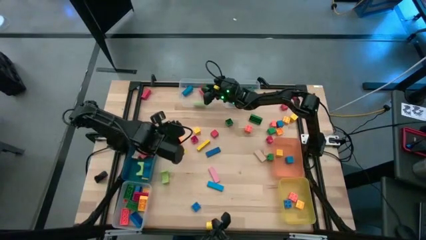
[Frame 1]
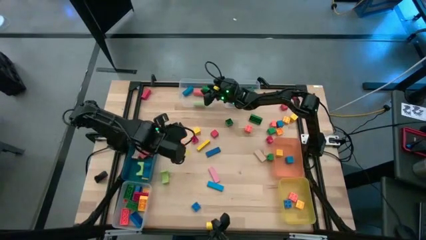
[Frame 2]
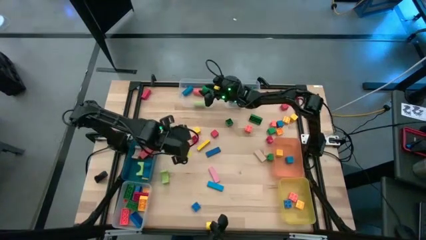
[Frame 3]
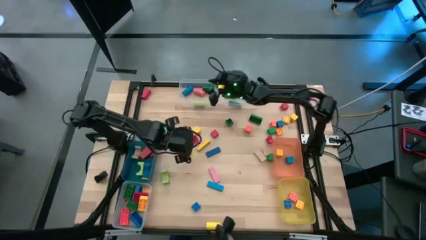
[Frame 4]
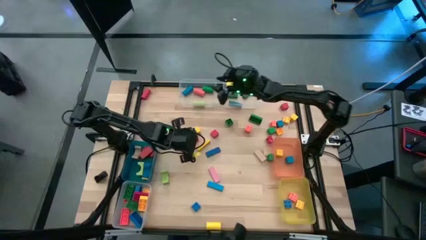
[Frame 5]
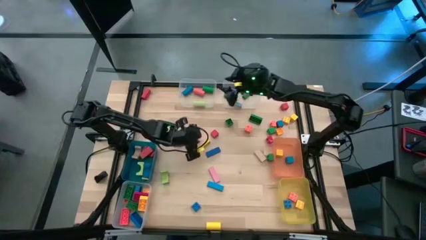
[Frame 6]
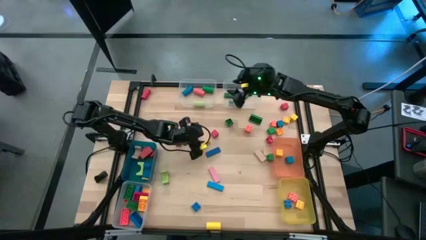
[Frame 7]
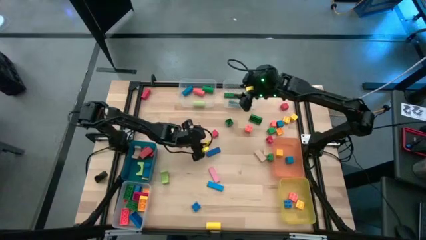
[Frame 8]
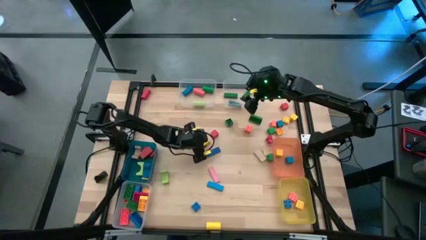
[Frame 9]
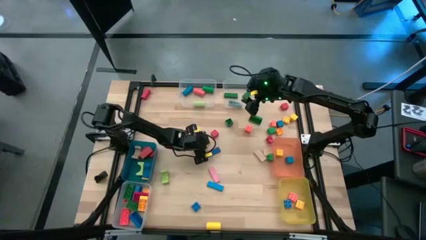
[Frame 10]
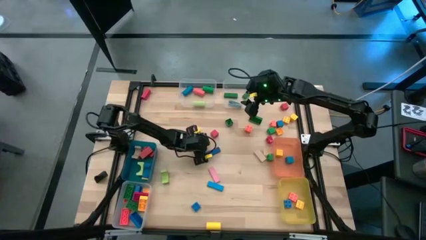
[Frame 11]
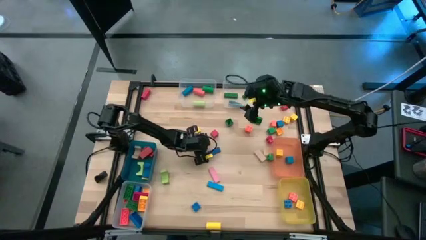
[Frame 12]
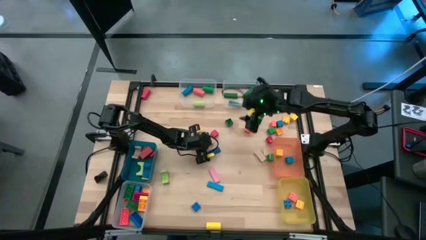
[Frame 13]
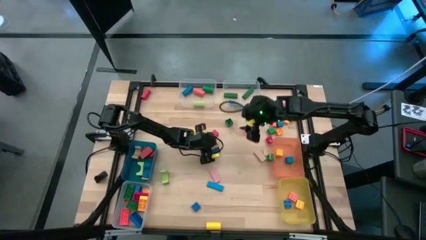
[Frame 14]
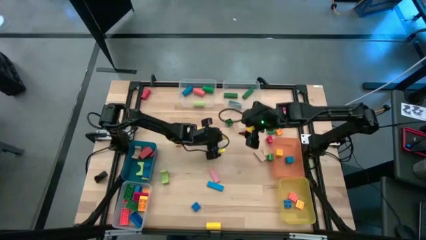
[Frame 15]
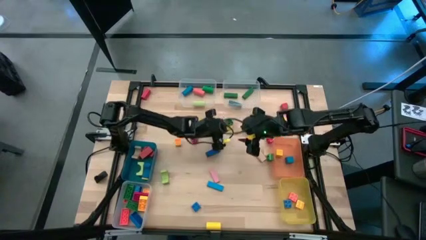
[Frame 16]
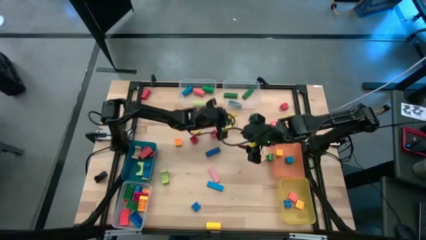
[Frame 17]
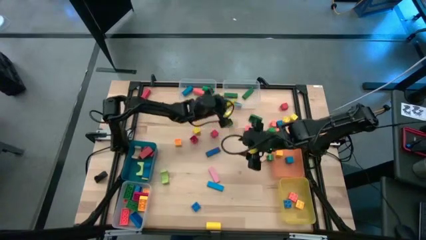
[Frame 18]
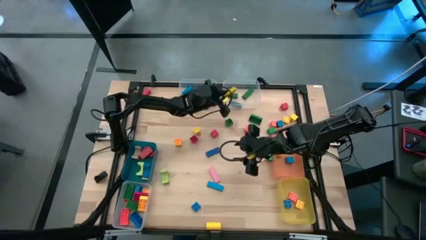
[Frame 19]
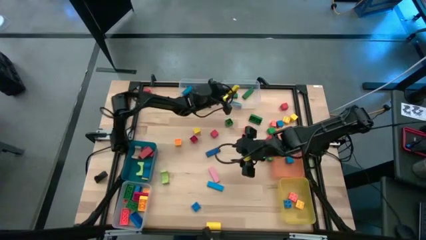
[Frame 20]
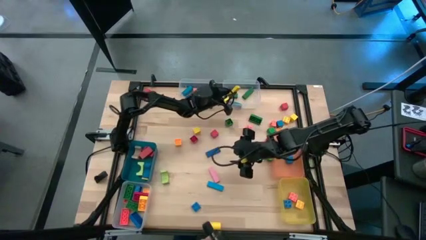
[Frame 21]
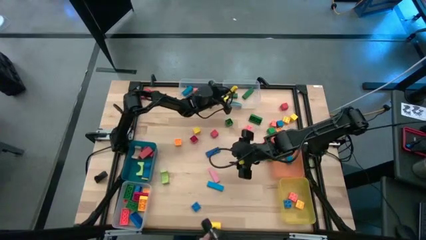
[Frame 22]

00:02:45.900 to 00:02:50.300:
Task: Sort blocks by size
Put the yellow block into the top right transparent bin

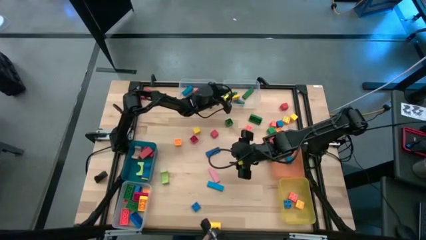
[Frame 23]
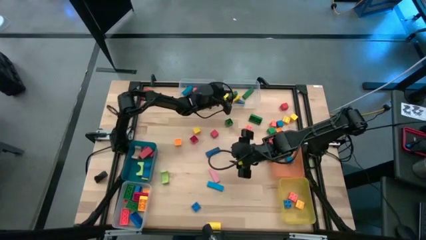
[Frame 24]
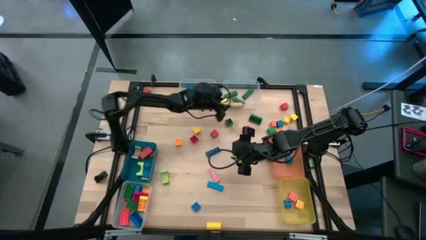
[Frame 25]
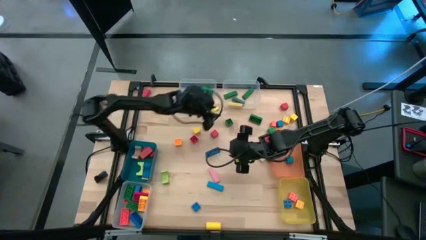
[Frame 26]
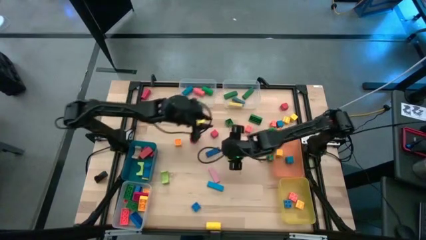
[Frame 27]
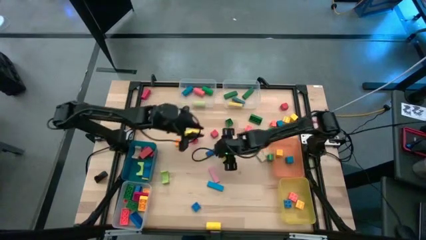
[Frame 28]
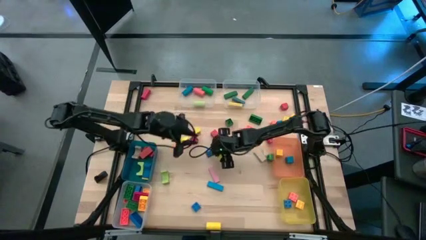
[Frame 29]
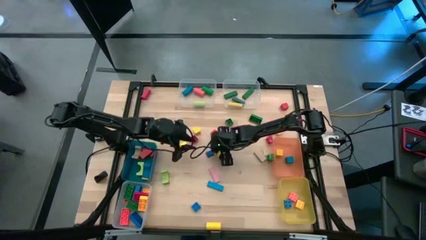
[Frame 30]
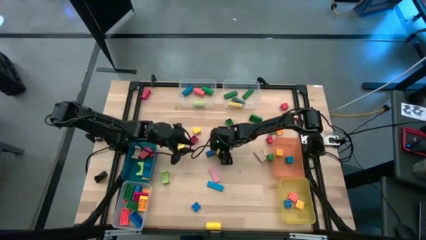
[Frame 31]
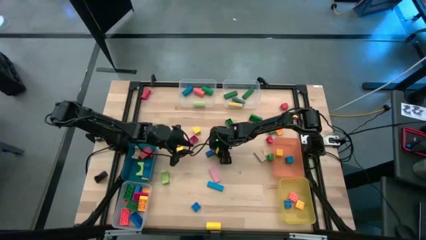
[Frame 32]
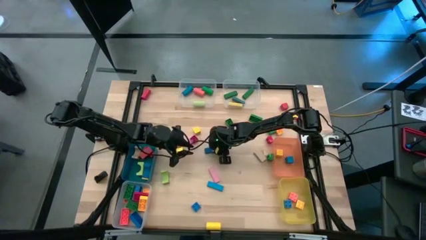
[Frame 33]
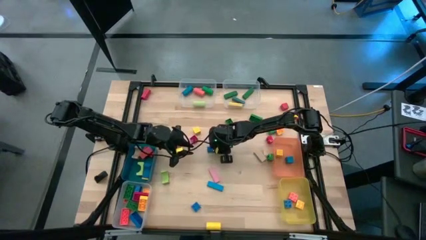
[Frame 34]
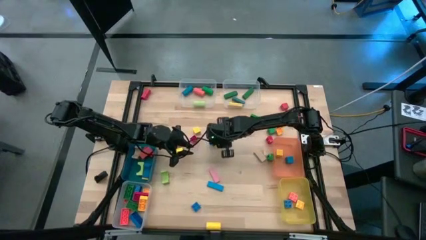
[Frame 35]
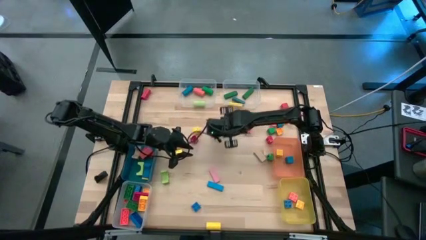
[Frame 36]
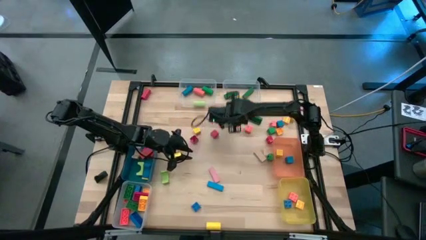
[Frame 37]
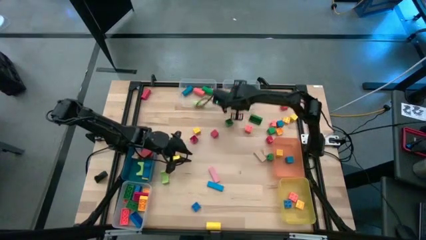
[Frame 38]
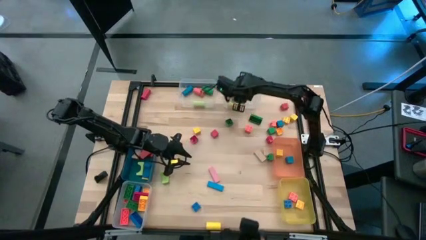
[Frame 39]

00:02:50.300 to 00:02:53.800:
Put the blue block into the top right transparent bin

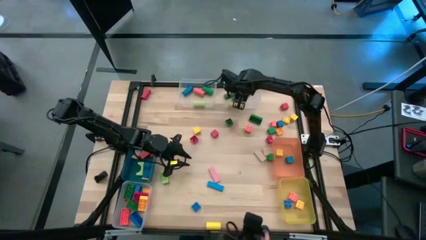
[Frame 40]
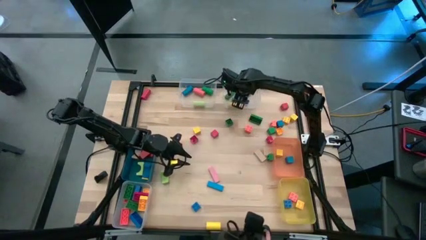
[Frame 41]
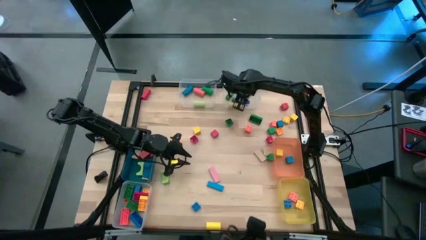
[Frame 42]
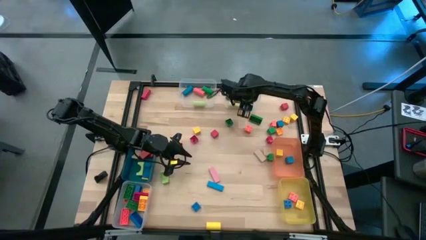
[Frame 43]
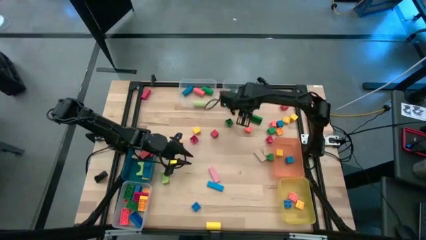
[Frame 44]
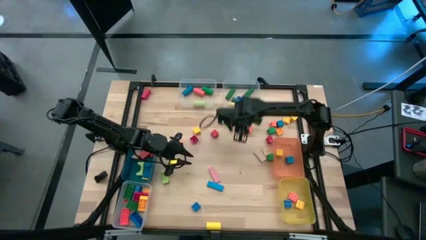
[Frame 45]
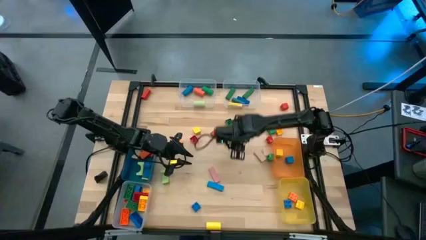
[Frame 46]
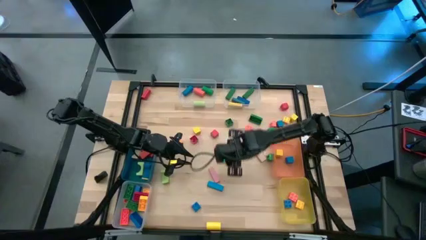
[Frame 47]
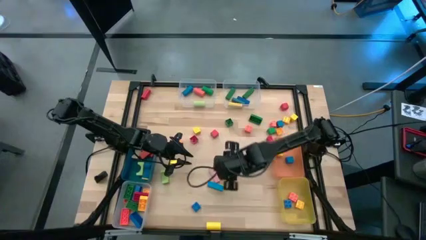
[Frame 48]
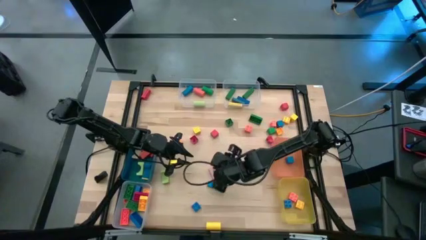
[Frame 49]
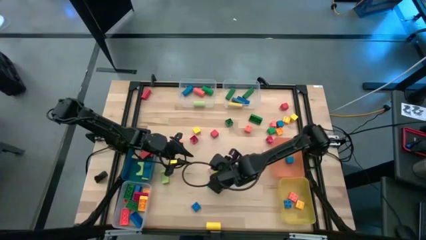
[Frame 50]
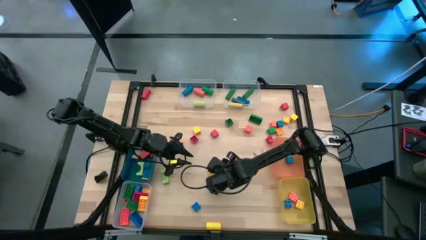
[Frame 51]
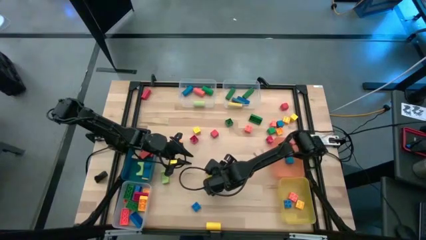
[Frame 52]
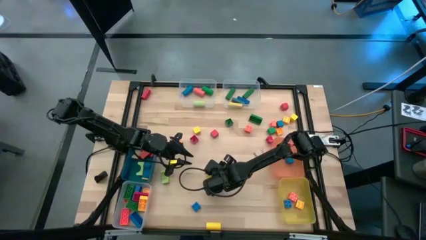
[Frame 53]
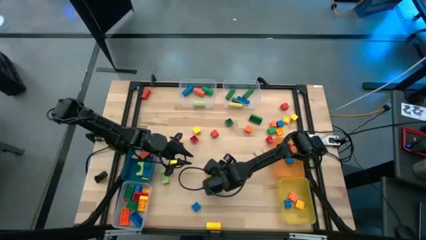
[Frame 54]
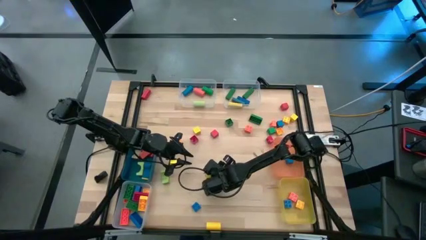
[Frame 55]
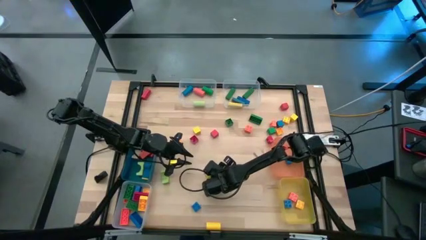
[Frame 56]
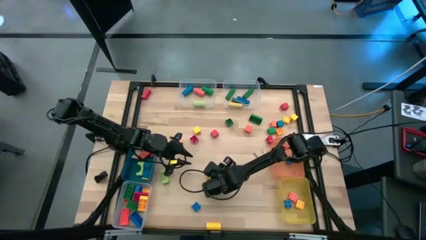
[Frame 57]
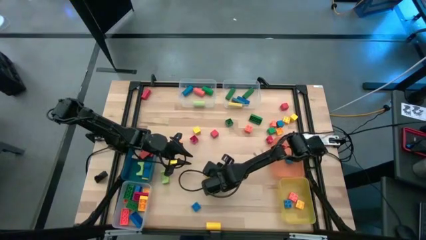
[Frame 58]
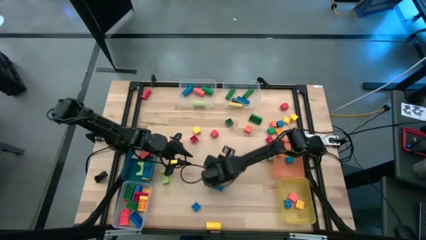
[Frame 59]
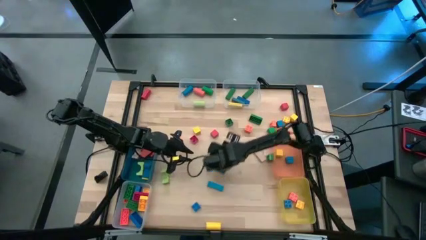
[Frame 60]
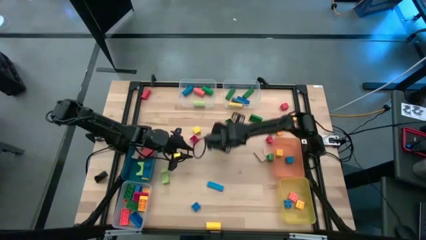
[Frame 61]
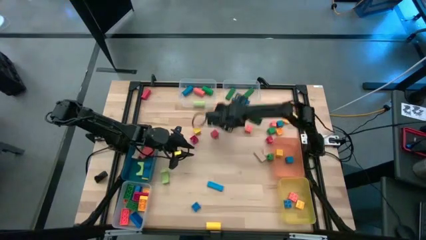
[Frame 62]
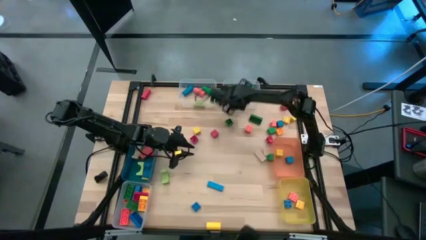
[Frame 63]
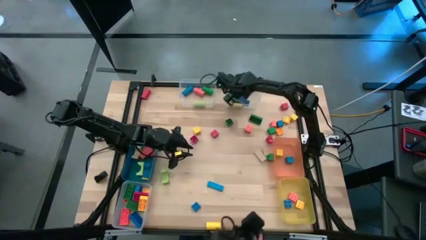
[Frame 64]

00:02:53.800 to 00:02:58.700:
Put the pink block into the top right transparent bin

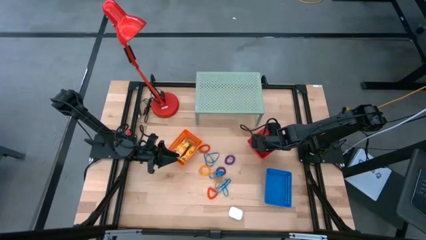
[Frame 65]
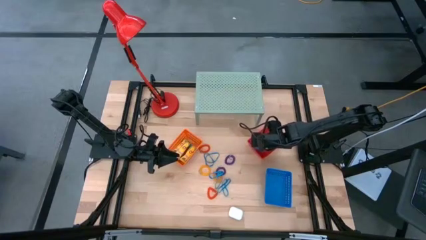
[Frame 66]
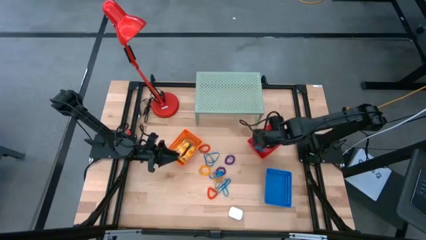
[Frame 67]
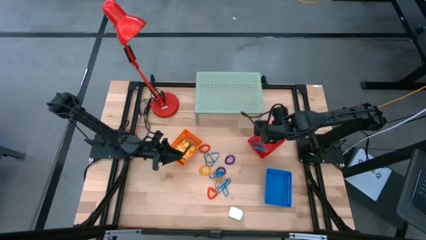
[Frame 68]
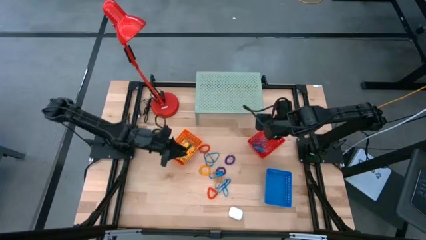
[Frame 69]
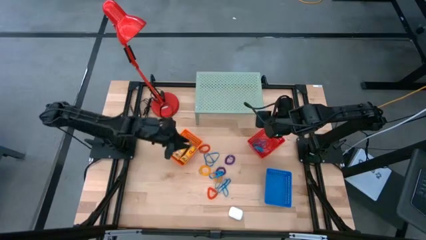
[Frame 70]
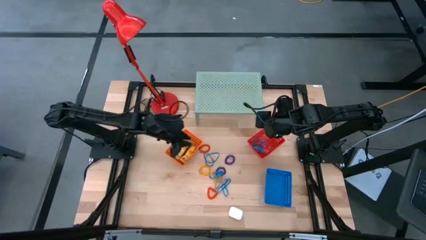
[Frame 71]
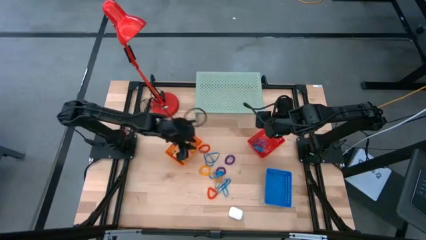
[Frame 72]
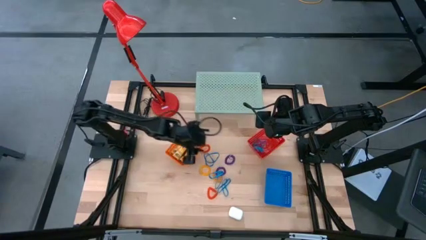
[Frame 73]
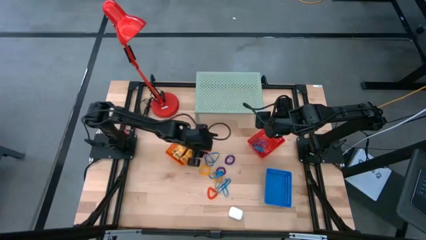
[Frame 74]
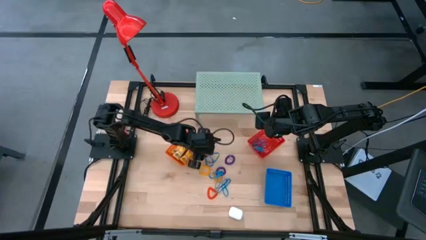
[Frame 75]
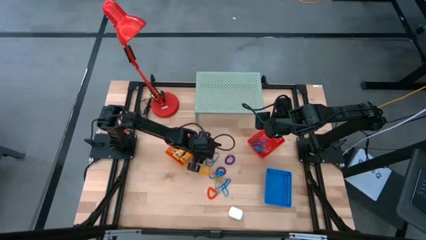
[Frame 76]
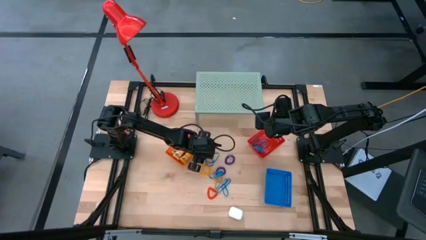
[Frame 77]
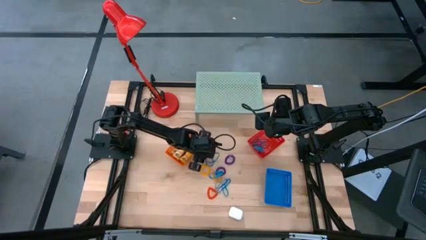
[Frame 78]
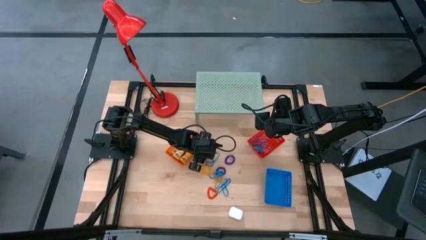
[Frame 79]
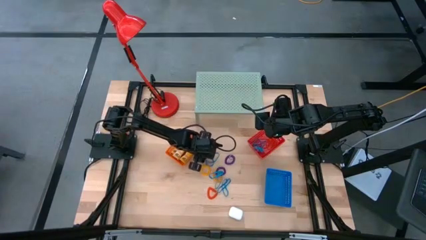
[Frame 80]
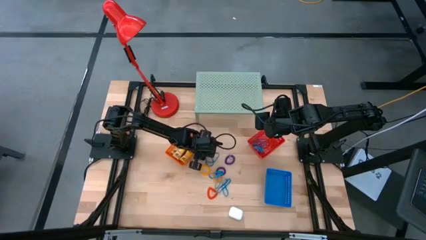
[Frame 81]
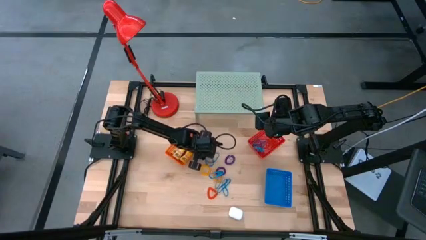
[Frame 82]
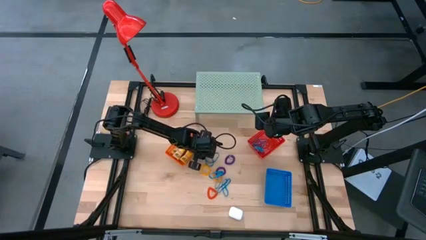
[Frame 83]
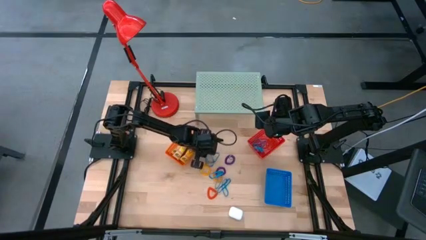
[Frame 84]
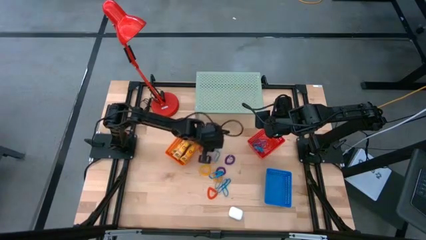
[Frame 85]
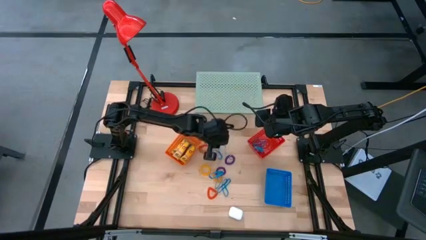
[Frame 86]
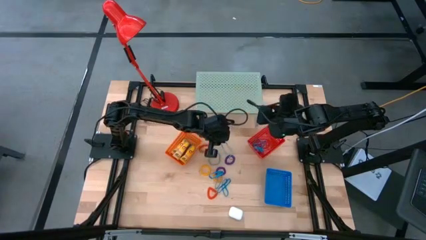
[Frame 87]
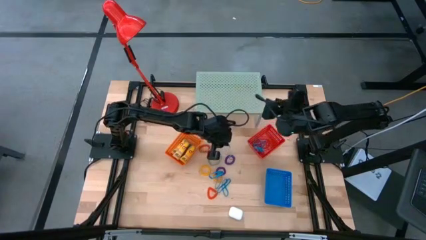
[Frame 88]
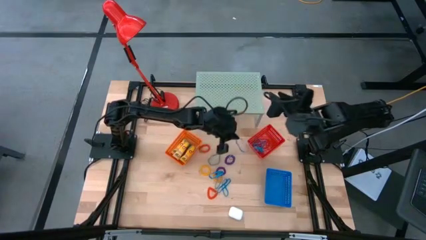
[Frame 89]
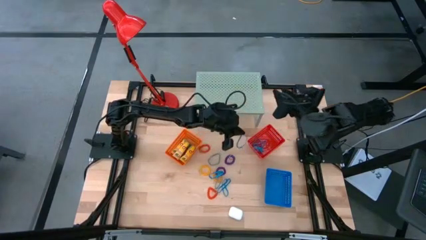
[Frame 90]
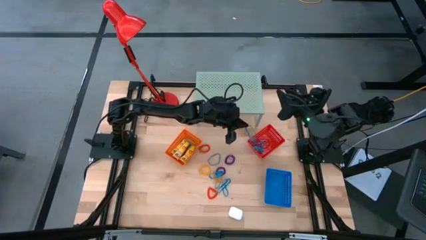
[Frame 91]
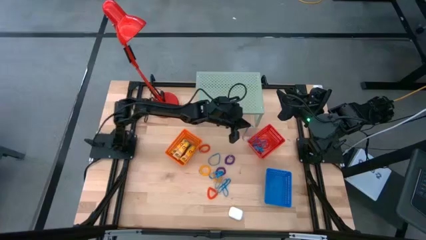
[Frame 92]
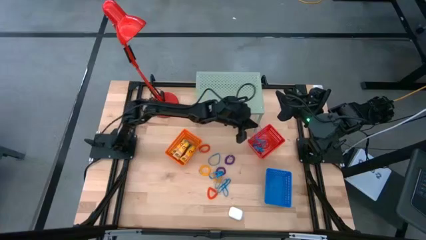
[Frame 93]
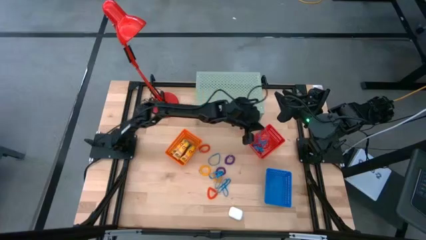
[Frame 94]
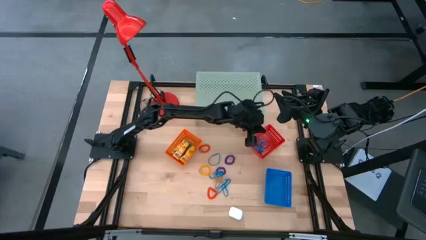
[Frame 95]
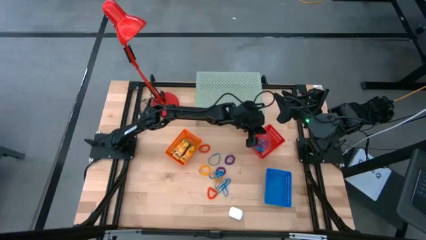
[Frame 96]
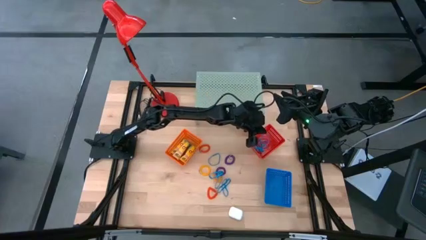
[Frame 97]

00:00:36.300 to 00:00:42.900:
Task: Pick & Place Office Desk Supplies
Put the blue rubber band into the red bin
